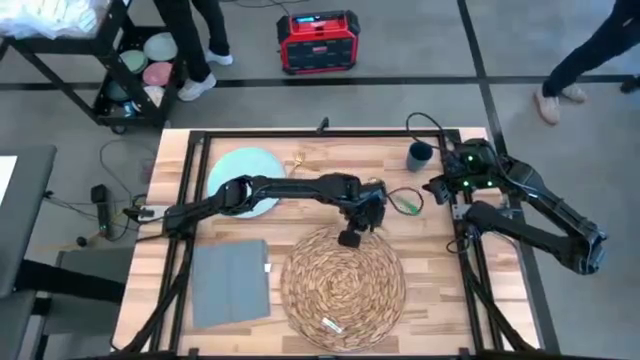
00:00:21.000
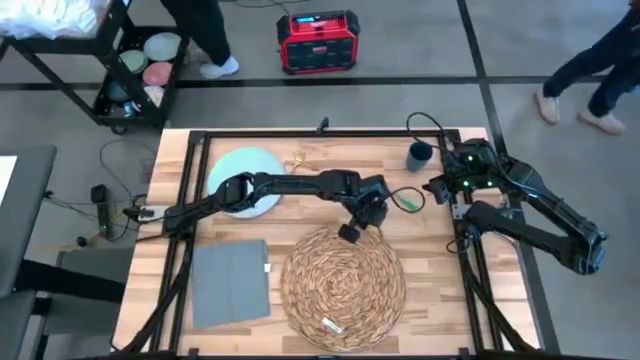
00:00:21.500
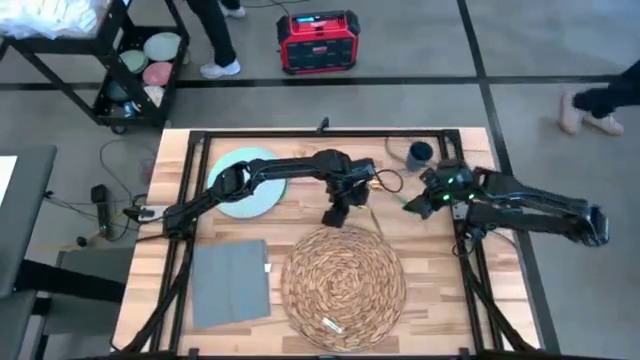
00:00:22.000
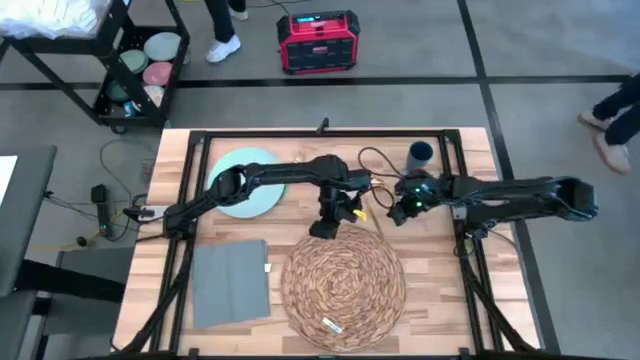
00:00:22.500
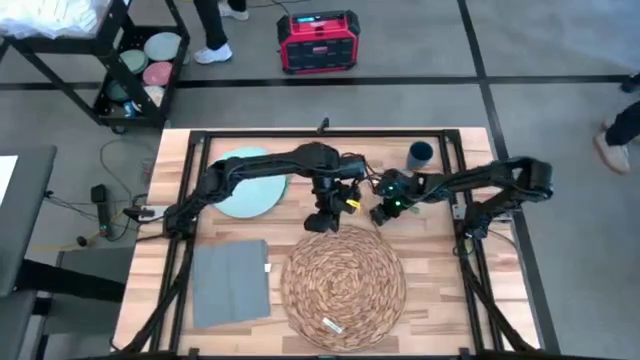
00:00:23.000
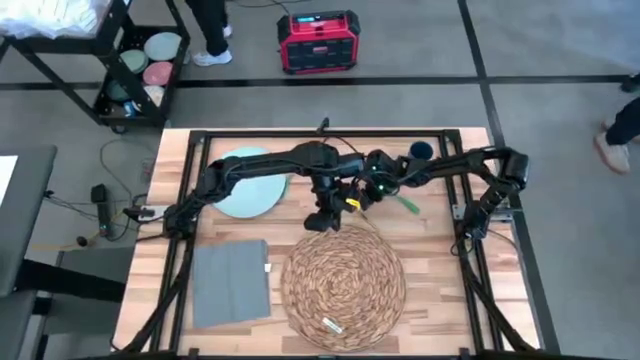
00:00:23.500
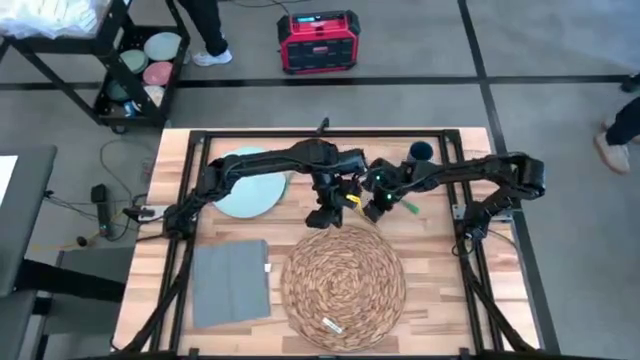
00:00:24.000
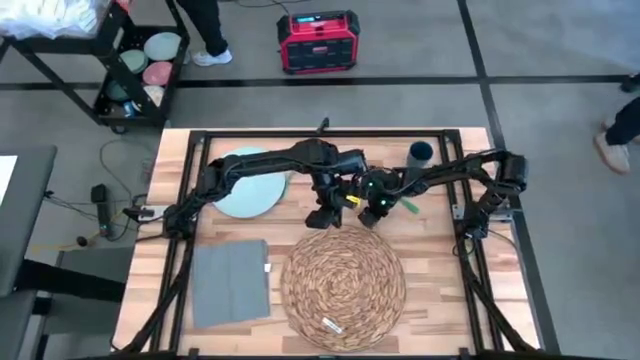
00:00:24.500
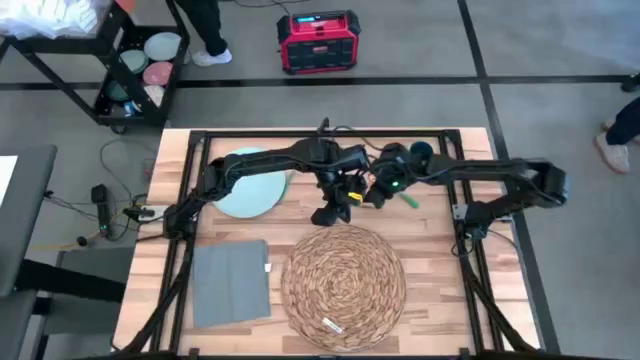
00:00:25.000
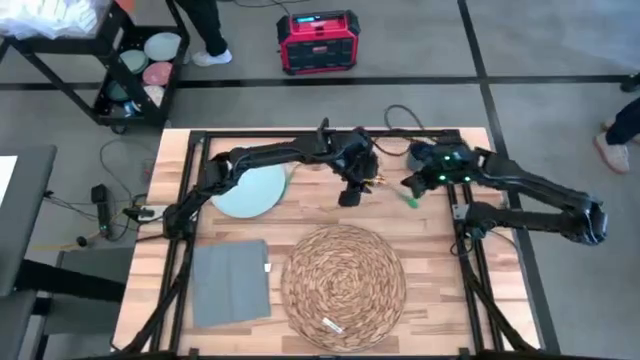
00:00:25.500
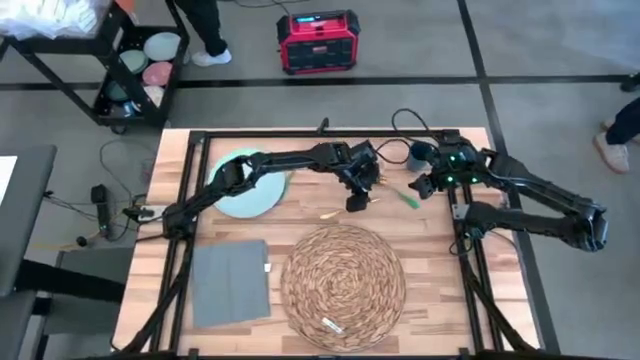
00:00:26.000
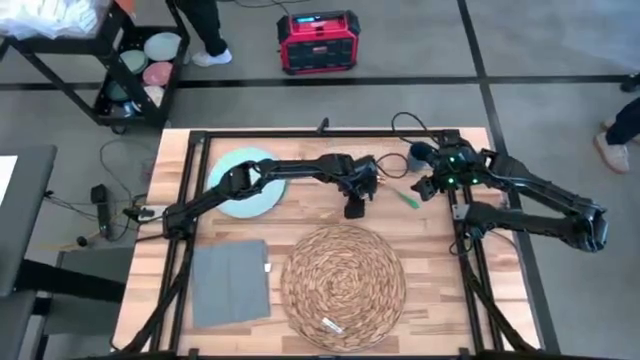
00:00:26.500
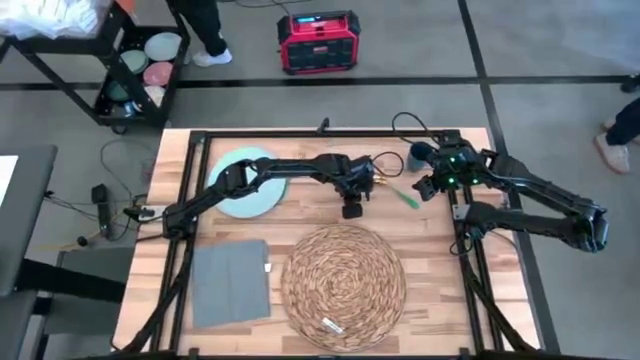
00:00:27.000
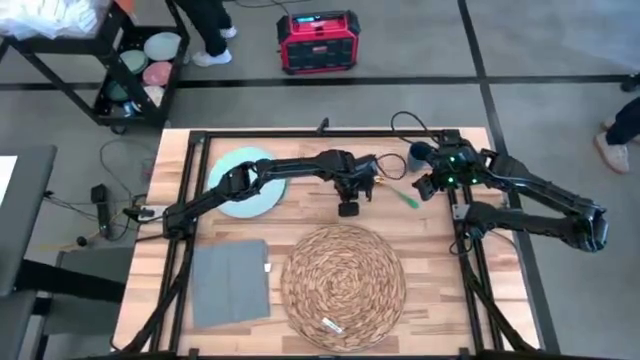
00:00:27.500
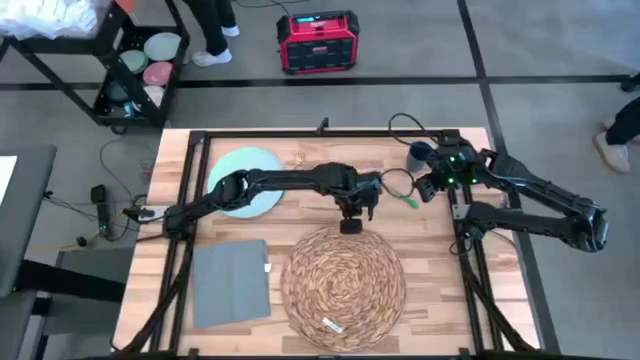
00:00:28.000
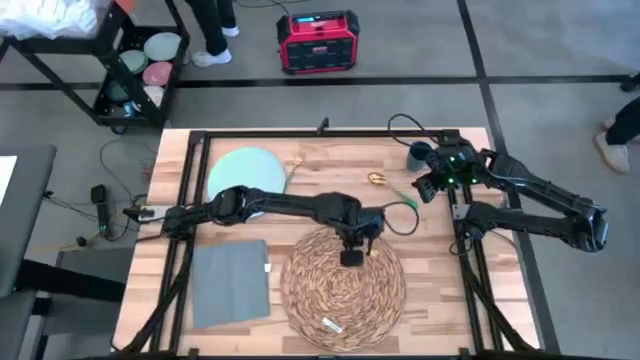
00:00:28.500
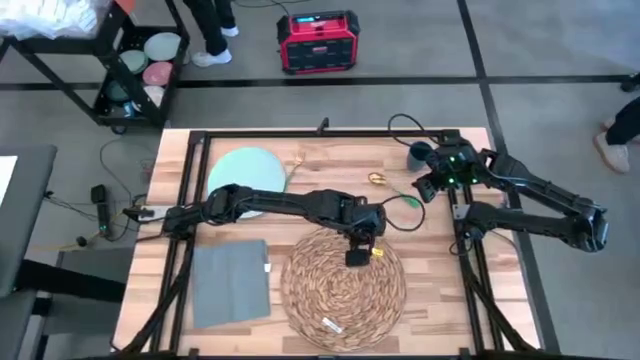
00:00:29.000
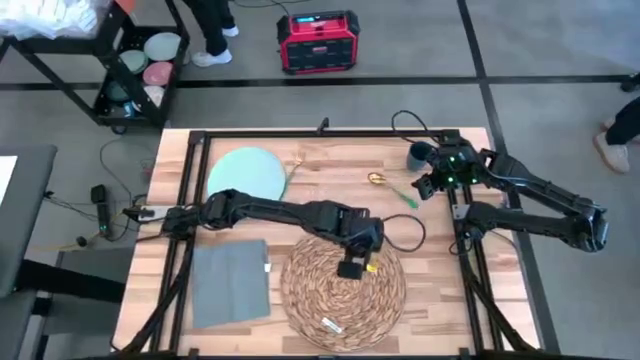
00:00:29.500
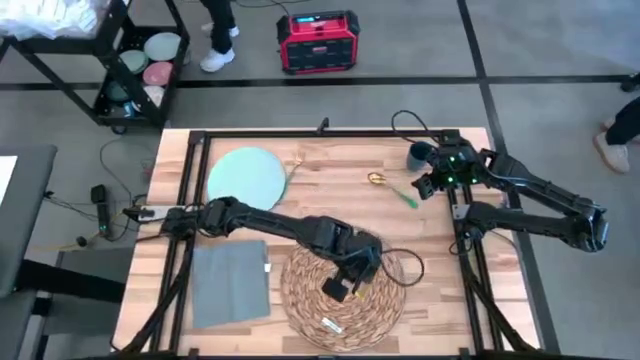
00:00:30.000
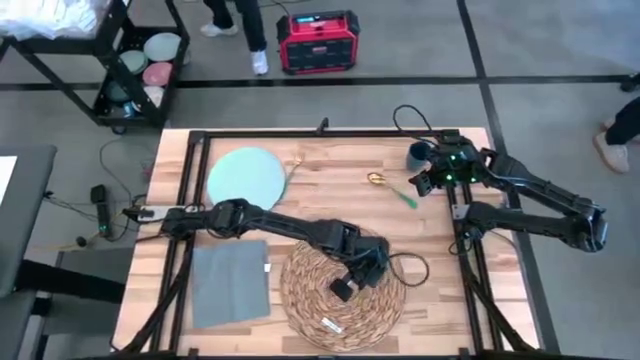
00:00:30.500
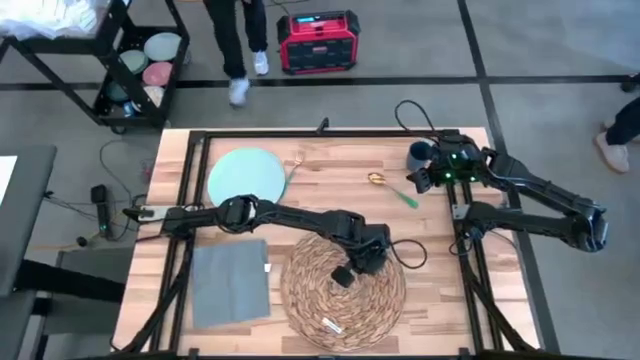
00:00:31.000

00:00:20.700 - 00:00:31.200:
Task: Set table place
Put the gold knife on the brown woven placemat

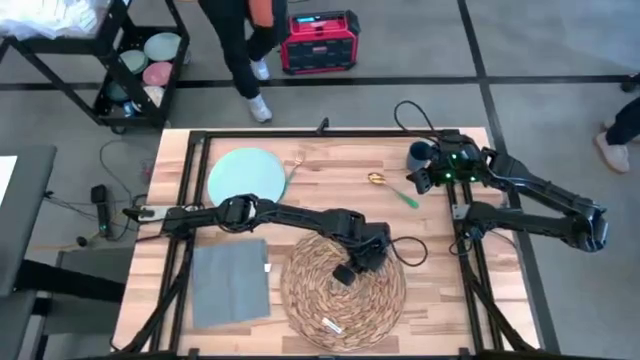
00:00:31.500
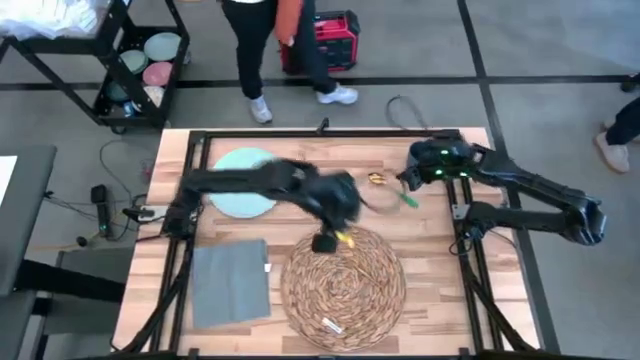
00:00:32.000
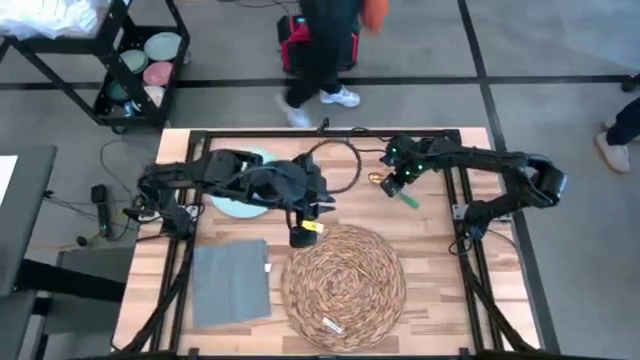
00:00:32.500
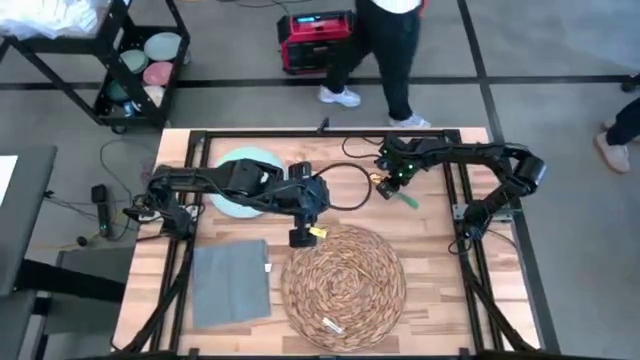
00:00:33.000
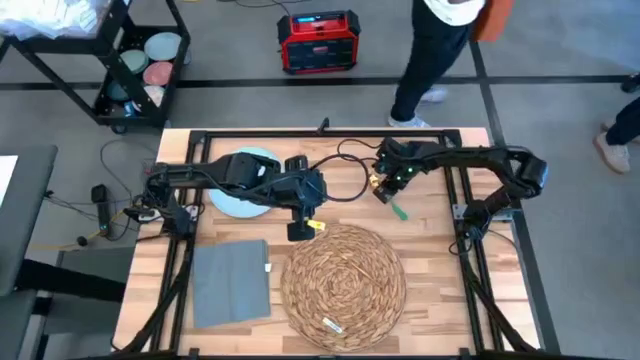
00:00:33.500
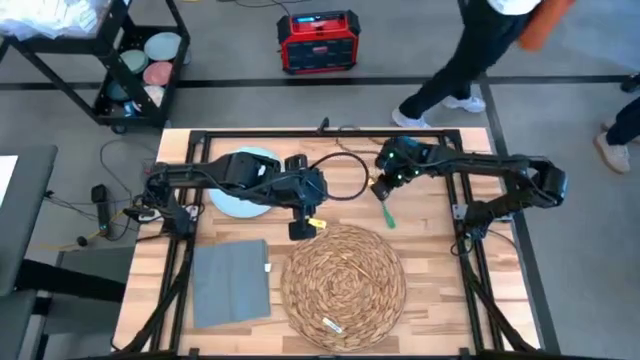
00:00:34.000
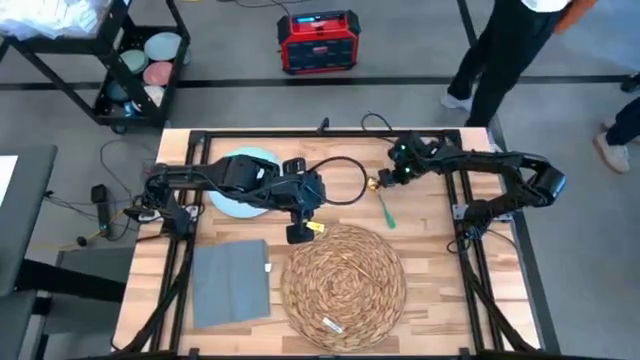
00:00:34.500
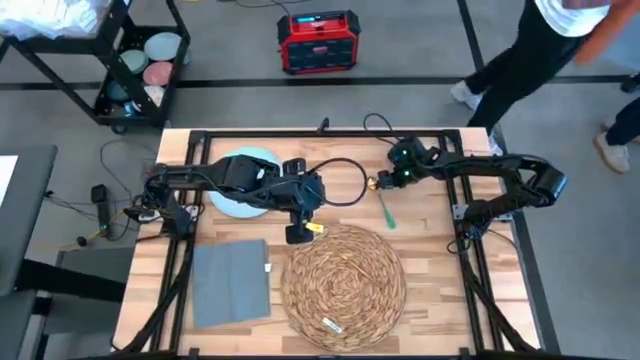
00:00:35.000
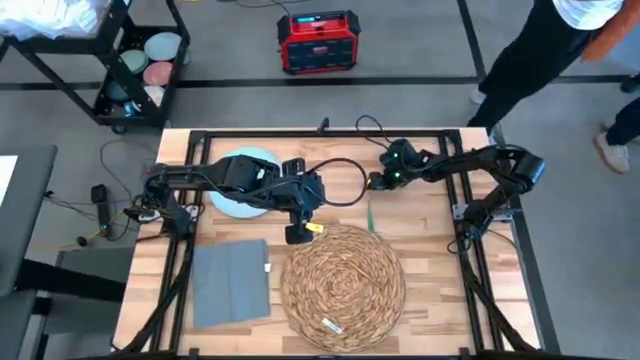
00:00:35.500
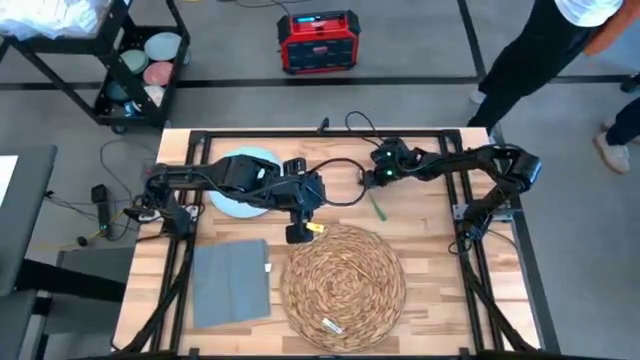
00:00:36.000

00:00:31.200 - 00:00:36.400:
Put the green spoon on the brown woven placemat

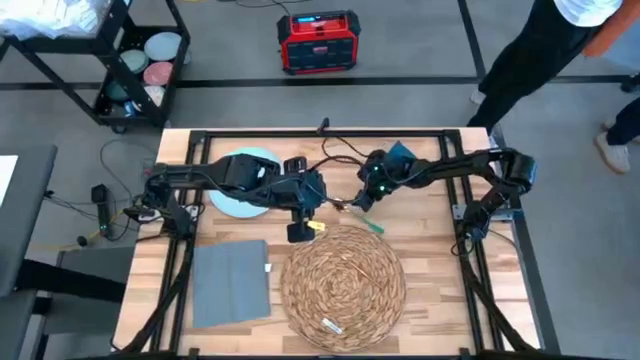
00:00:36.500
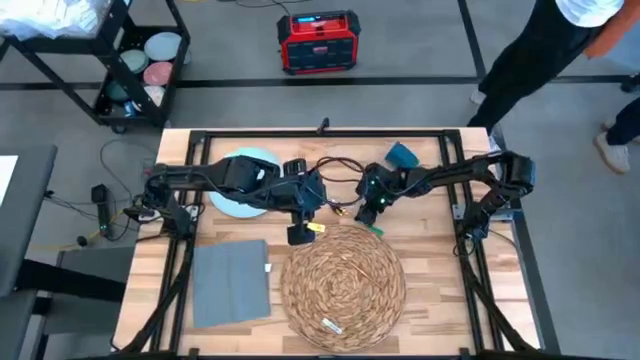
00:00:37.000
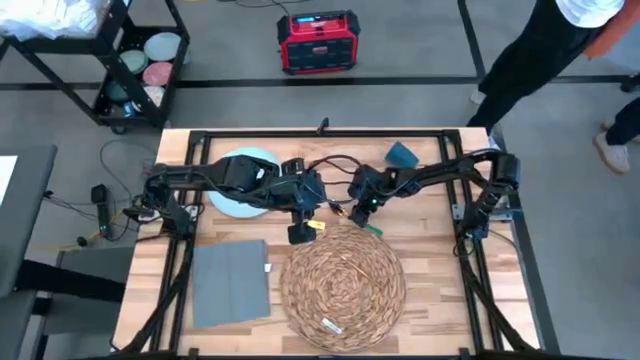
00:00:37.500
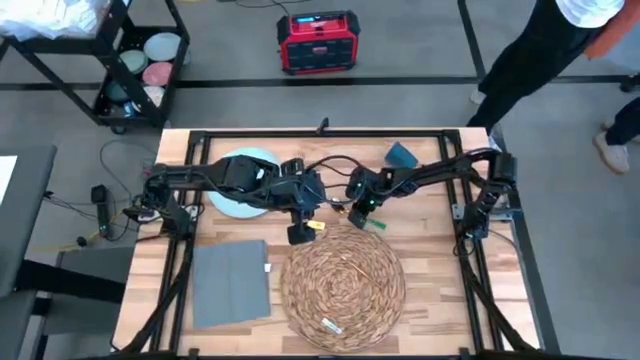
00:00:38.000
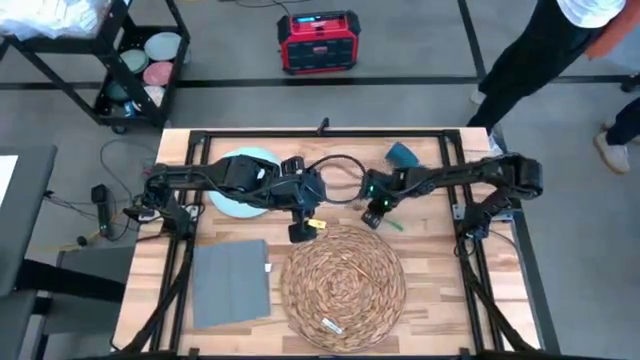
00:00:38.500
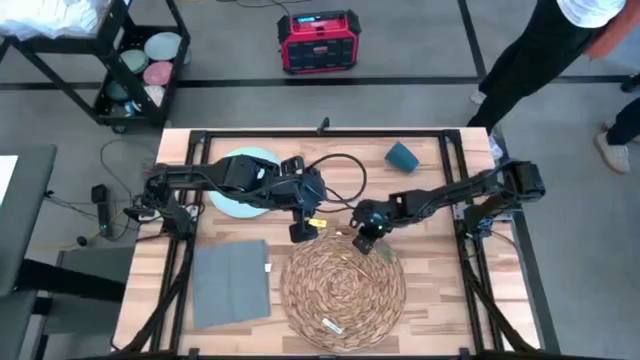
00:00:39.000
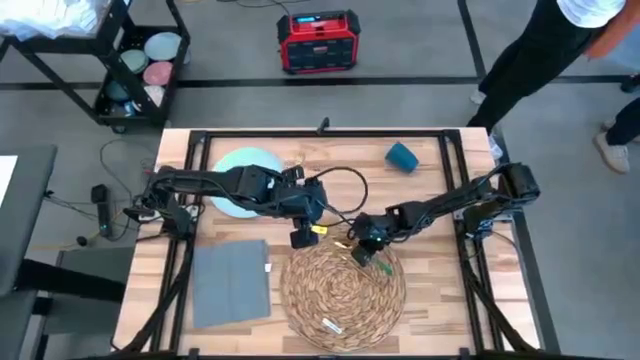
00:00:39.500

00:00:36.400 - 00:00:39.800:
Put the green spoon on the brown woven placemat

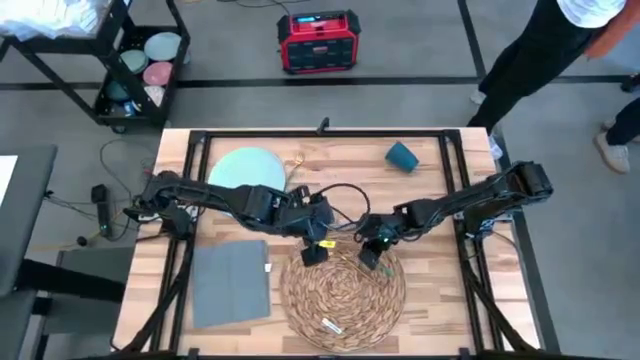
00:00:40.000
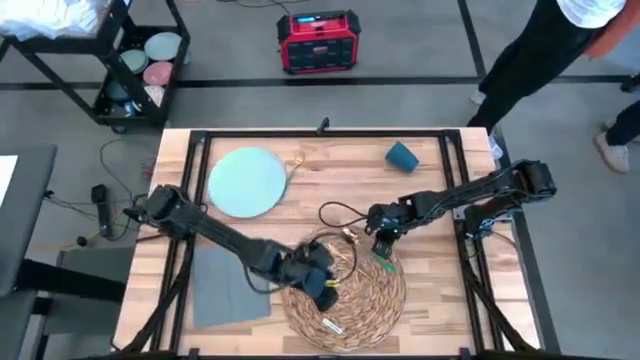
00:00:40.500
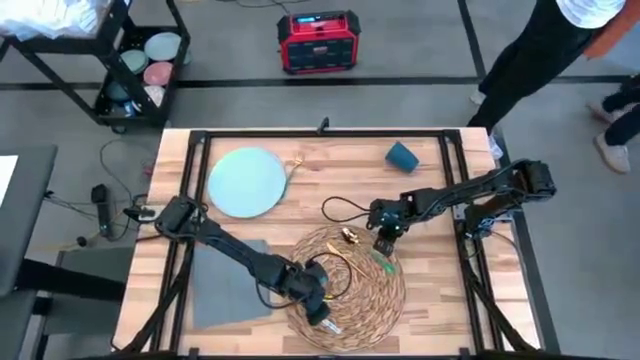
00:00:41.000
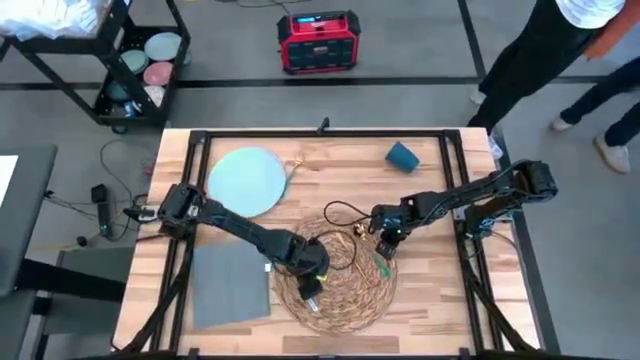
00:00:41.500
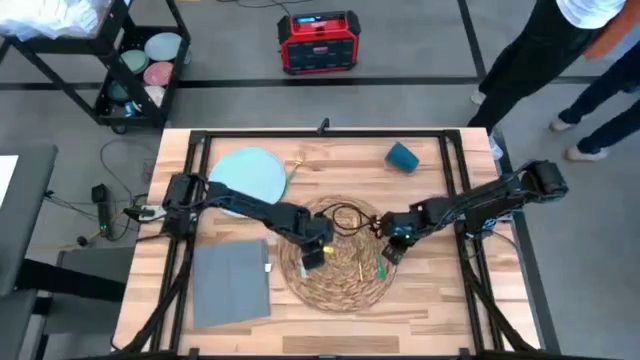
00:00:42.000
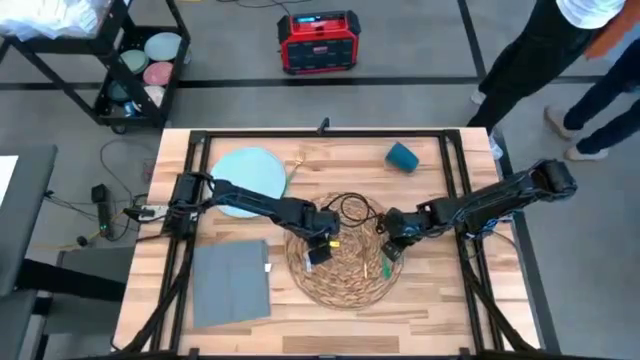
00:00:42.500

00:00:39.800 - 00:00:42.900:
Move the brown woven placemat from the bottom center to the center
